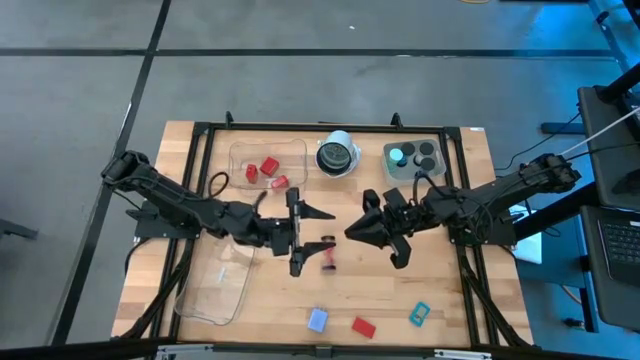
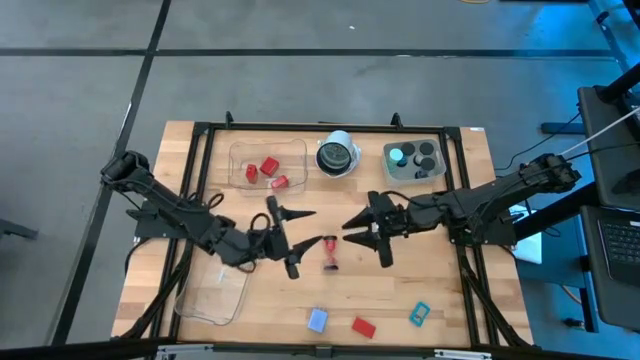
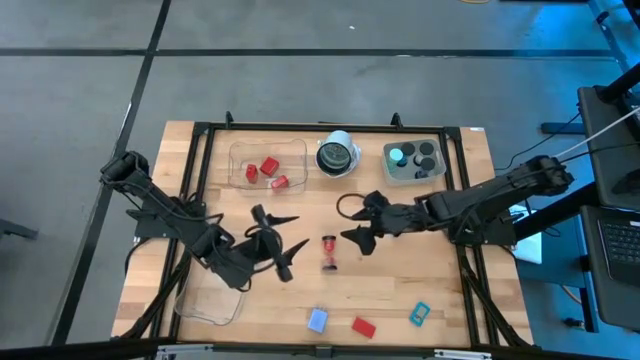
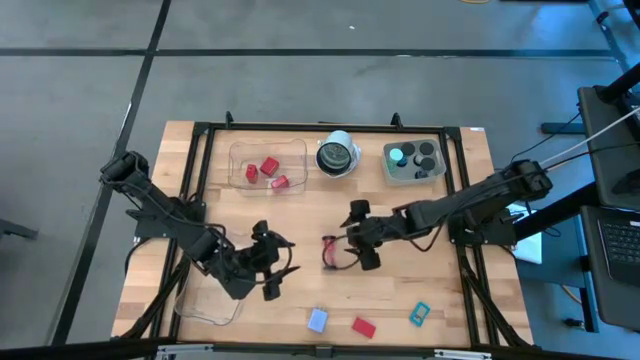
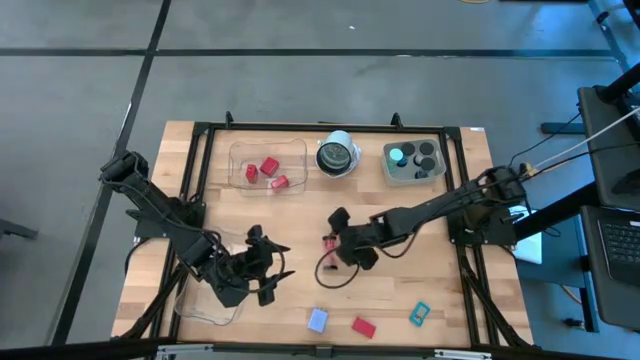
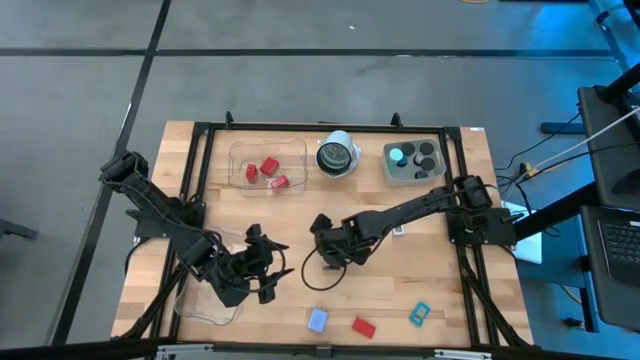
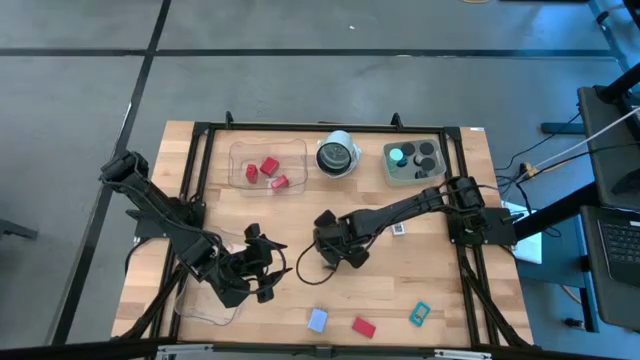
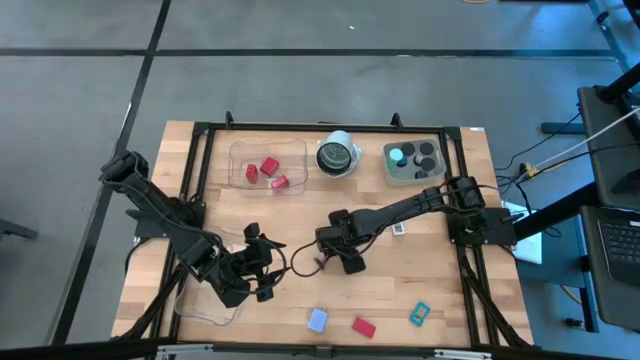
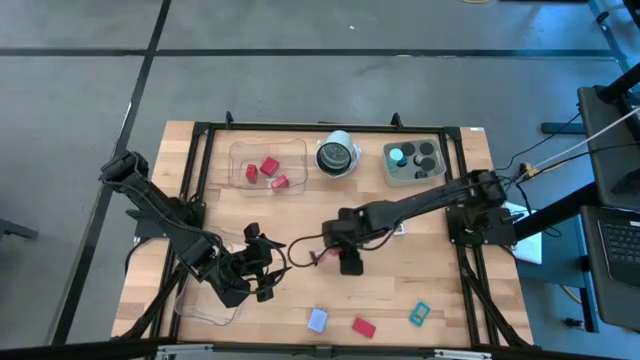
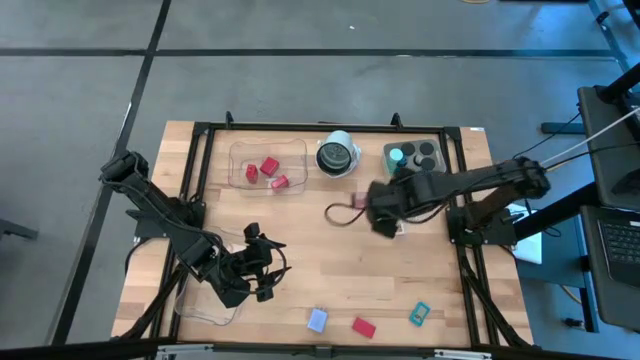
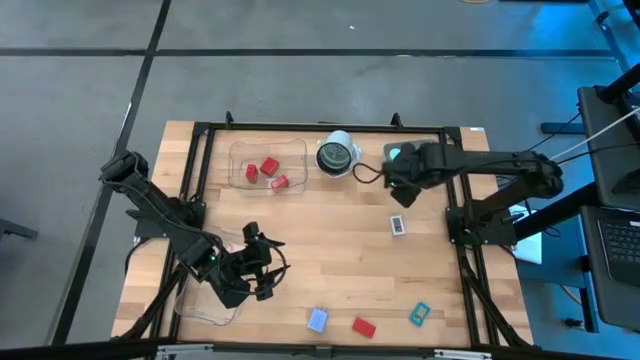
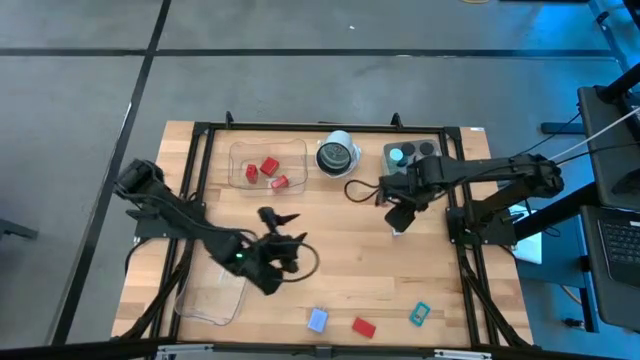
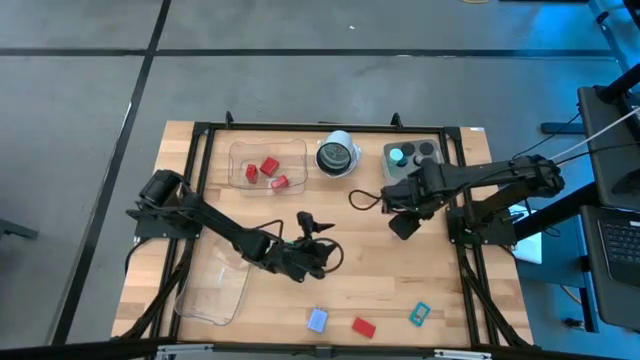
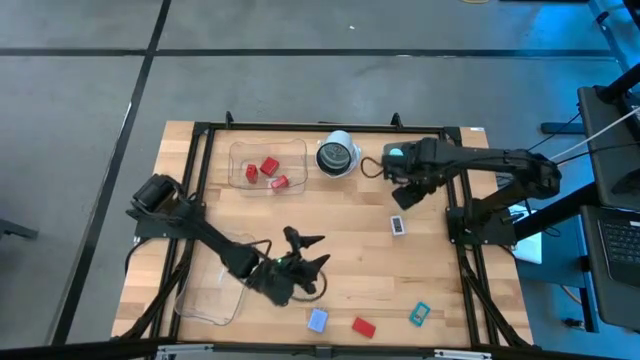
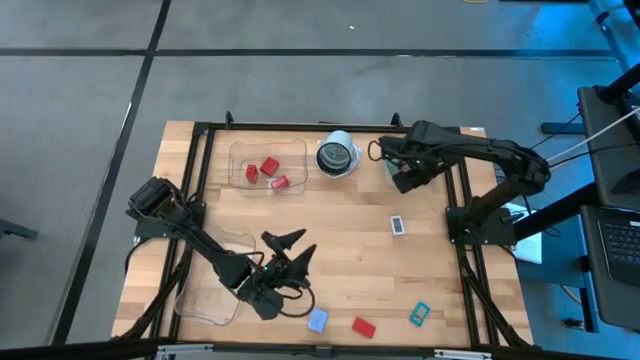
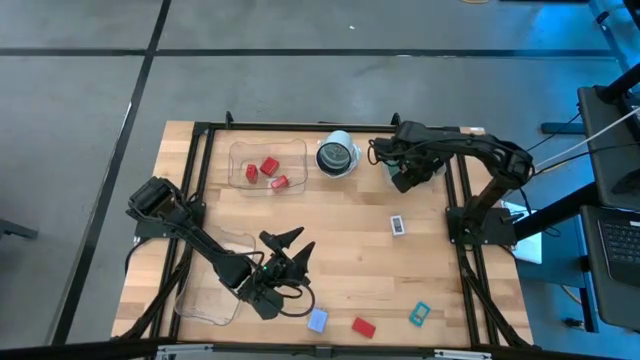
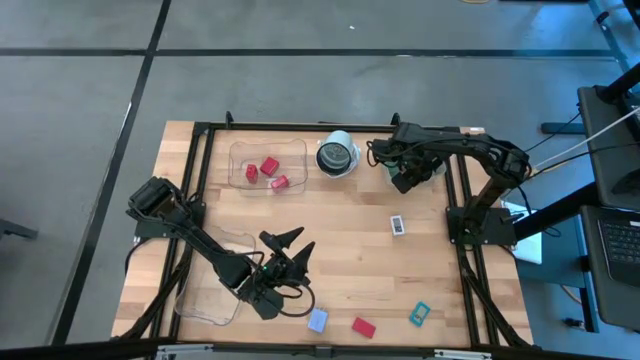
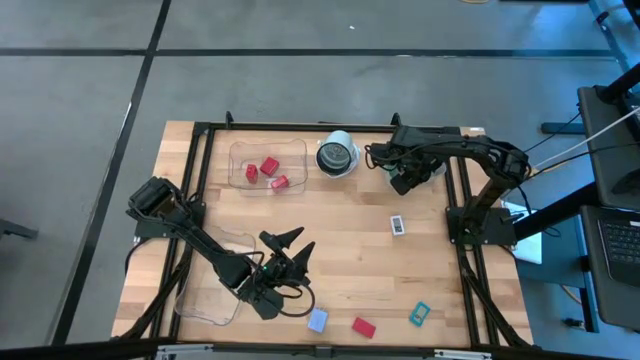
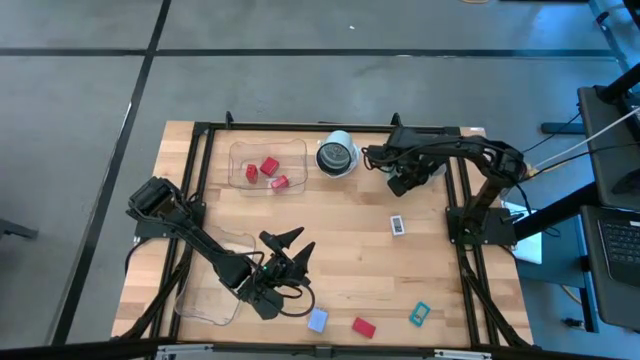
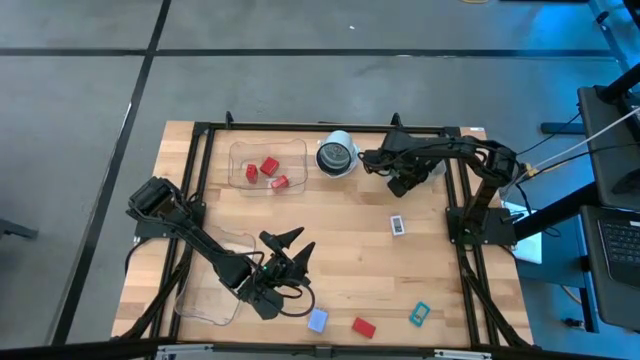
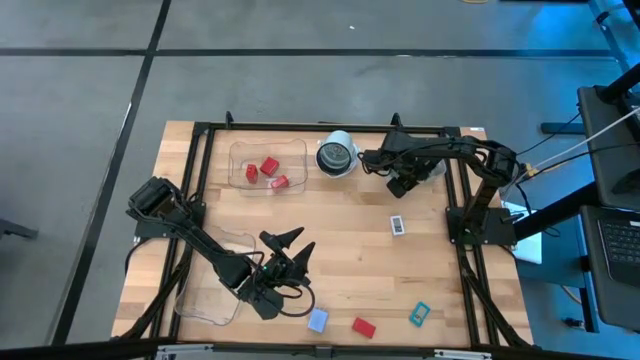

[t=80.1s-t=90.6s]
Task: Pick & Place Office items
Put the red hourglass into the gray bin

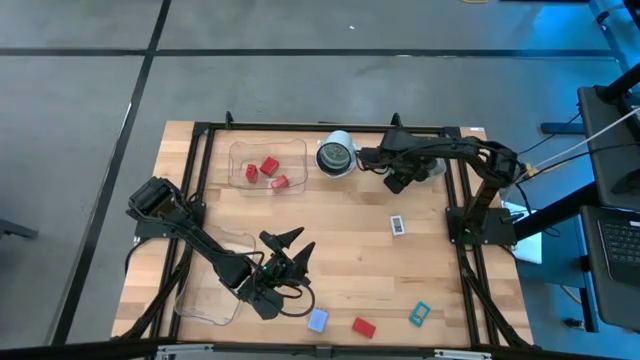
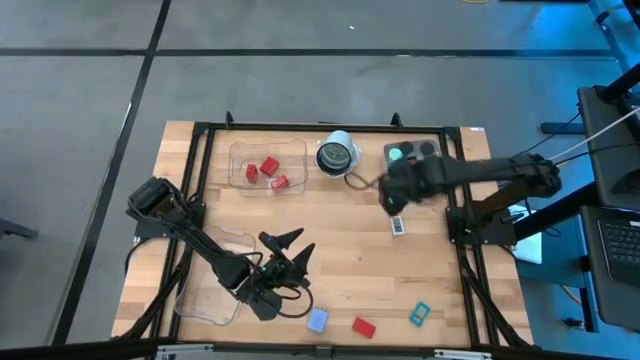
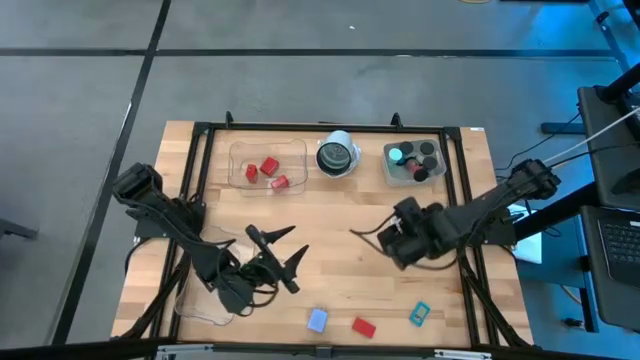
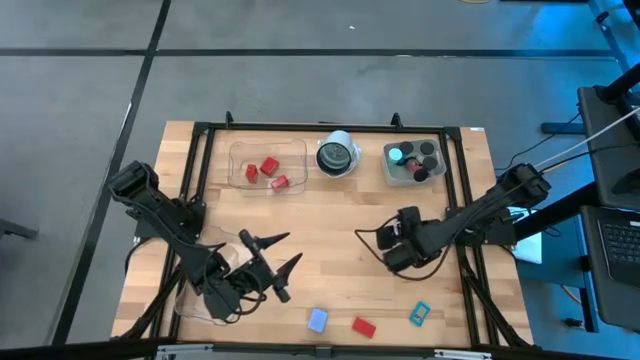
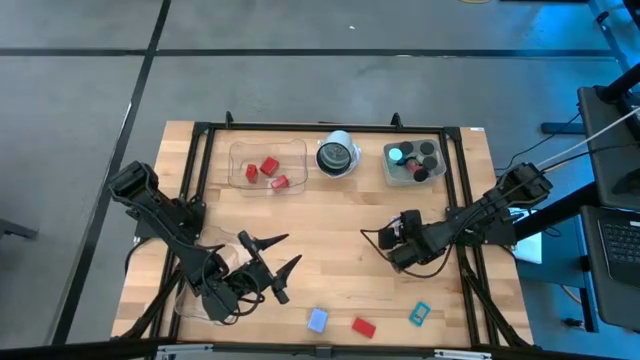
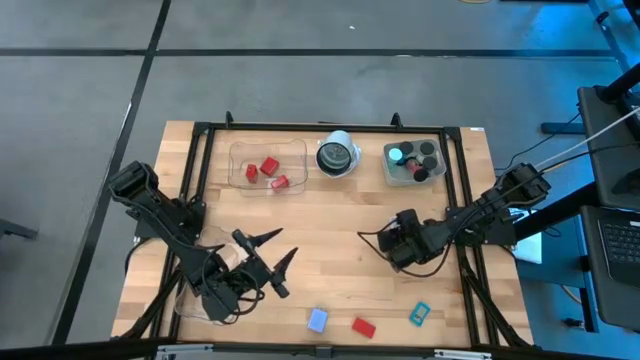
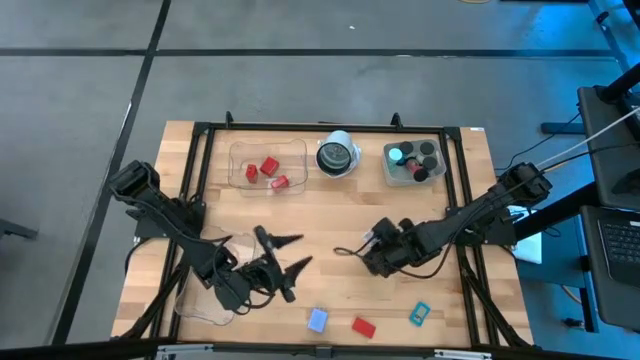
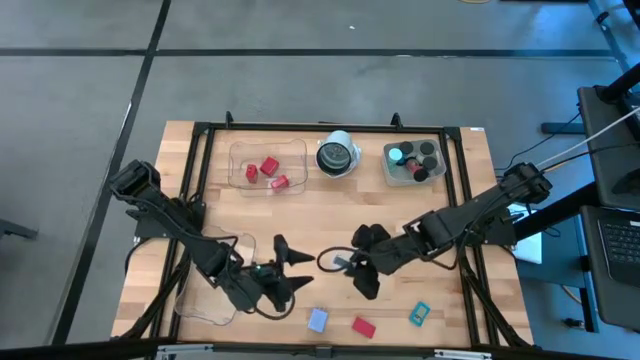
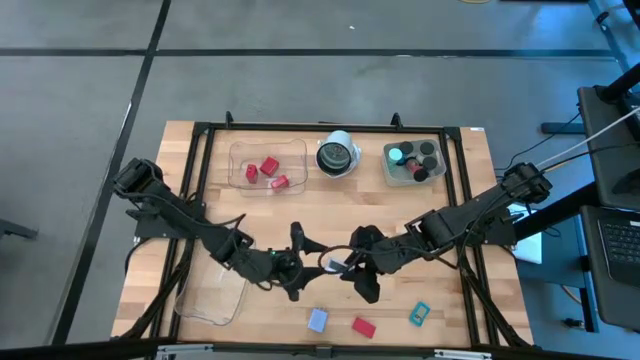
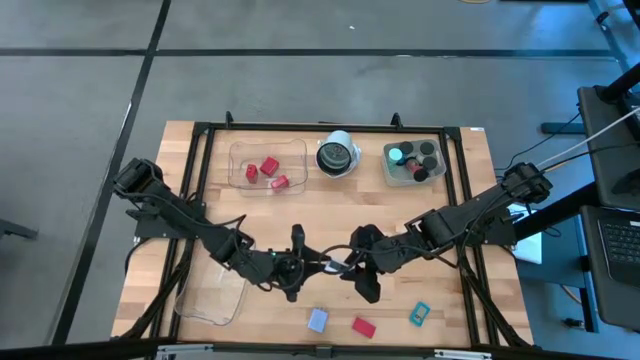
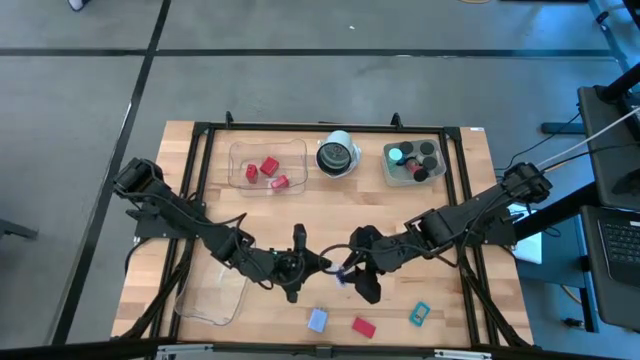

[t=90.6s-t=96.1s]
Put the white digital clock into the bottom transparent bin

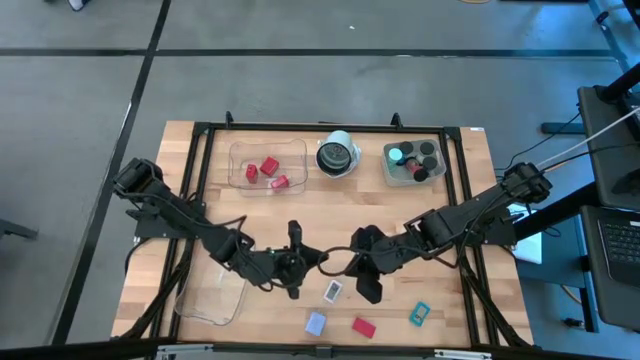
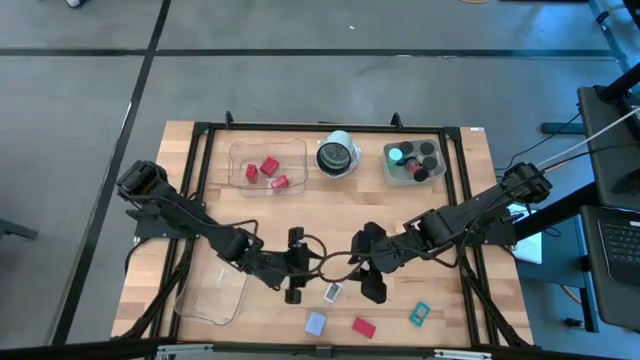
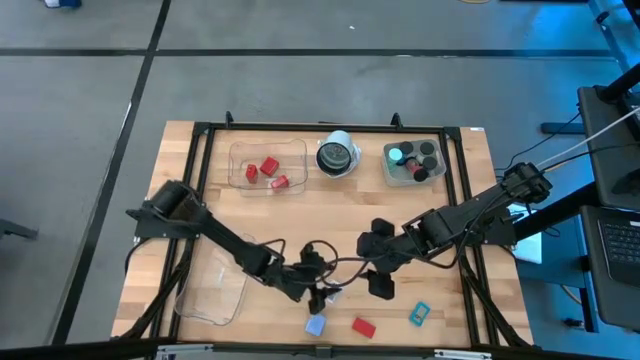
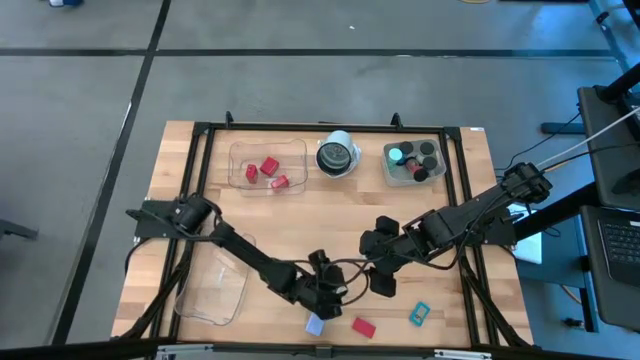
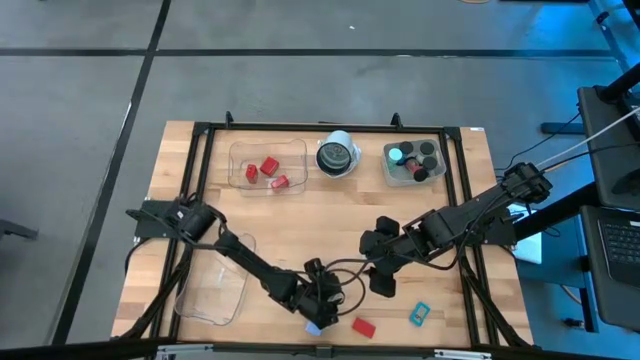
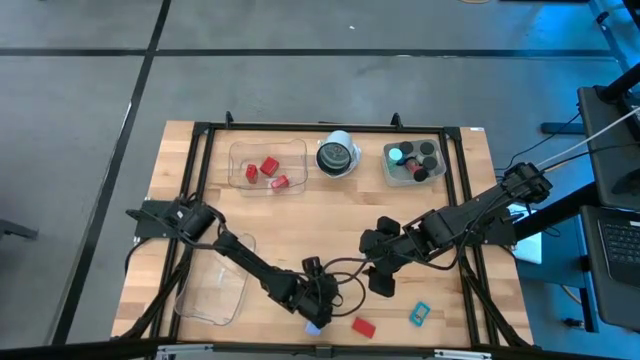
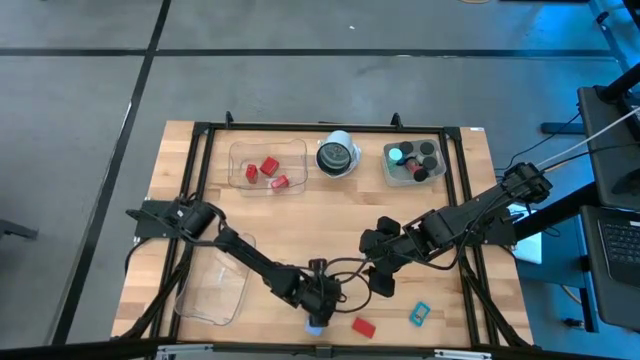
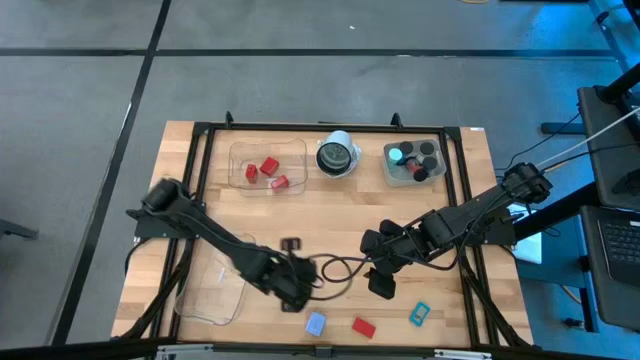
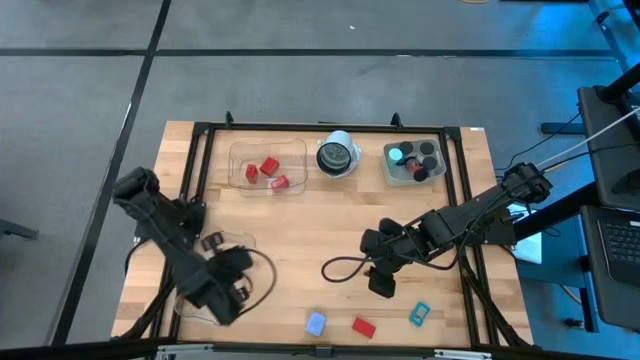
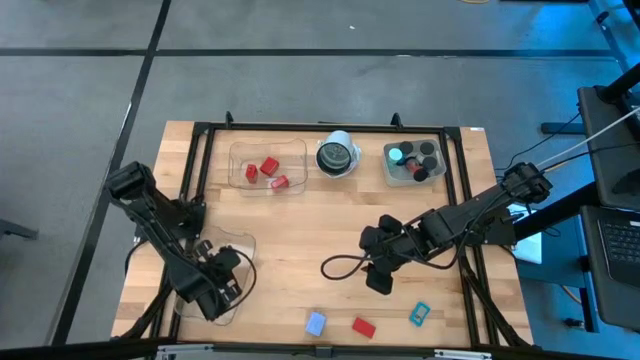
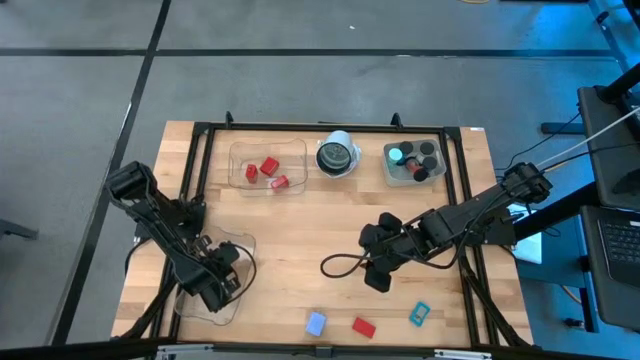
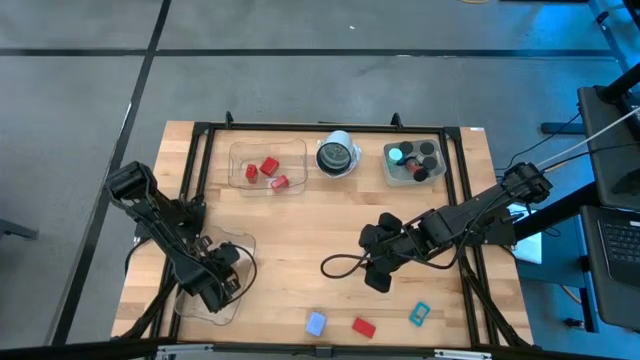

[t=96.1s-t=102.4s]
Put the white digital clock into the bottom transparent bin
